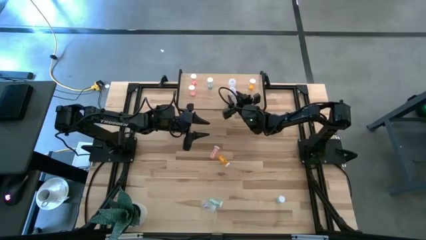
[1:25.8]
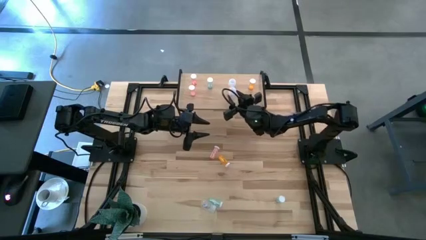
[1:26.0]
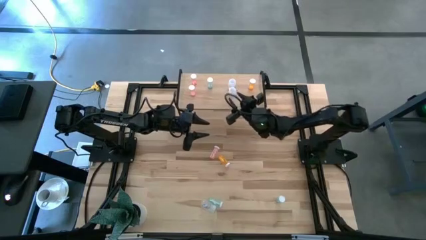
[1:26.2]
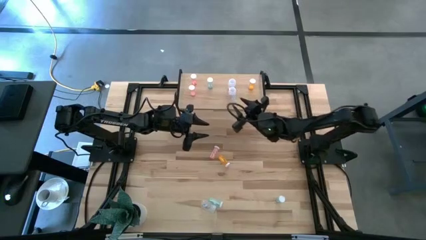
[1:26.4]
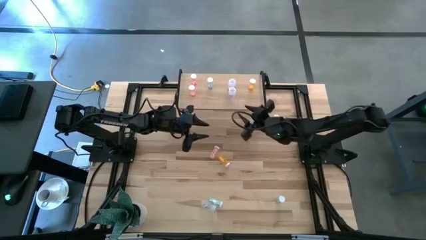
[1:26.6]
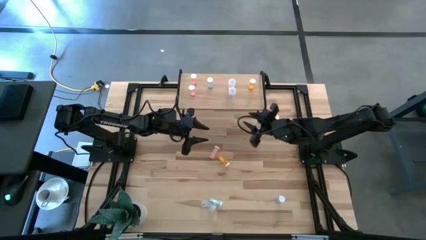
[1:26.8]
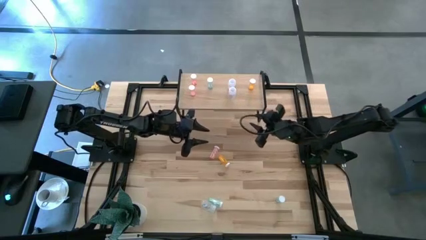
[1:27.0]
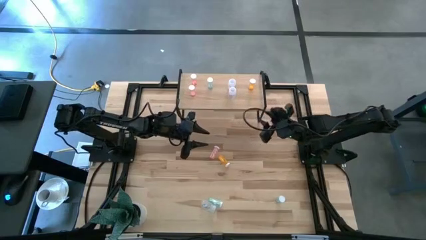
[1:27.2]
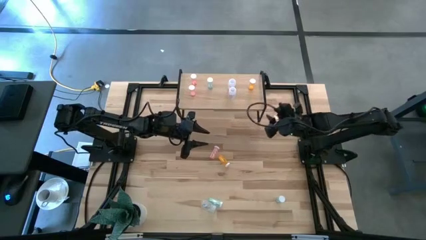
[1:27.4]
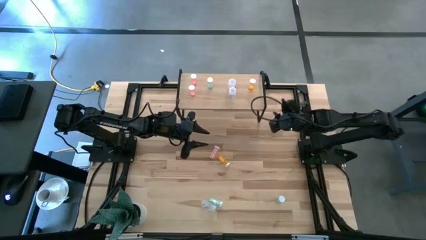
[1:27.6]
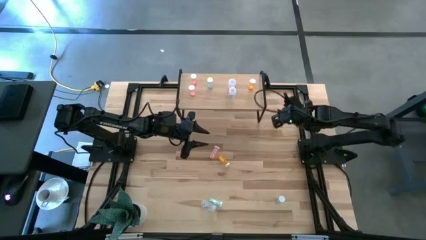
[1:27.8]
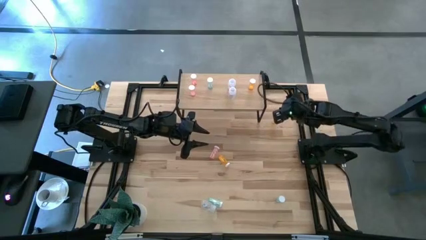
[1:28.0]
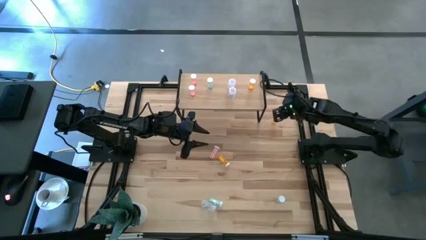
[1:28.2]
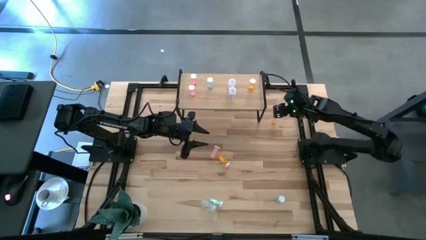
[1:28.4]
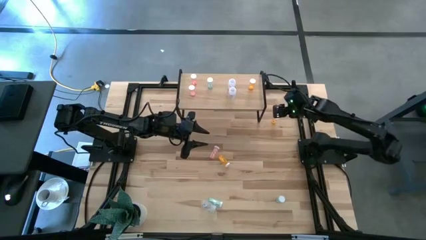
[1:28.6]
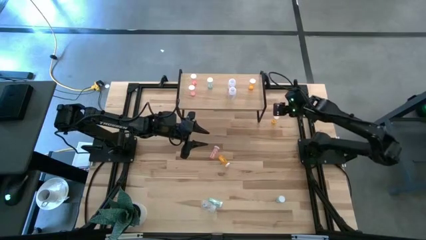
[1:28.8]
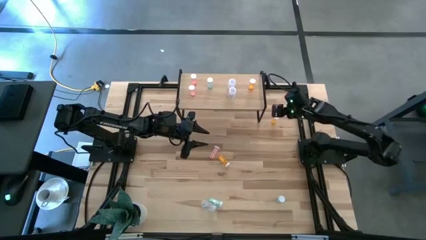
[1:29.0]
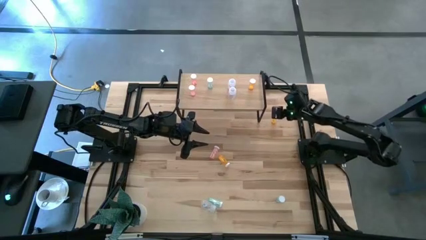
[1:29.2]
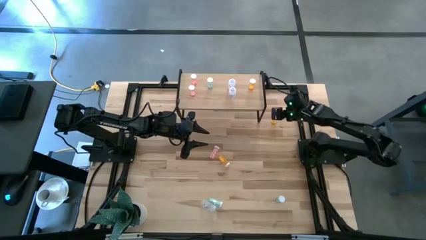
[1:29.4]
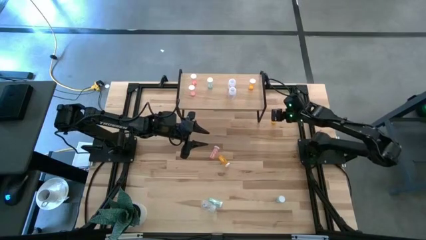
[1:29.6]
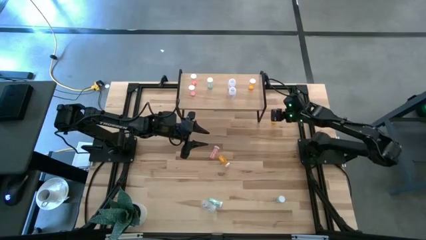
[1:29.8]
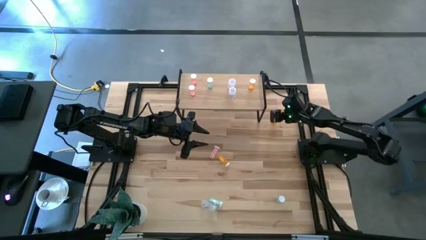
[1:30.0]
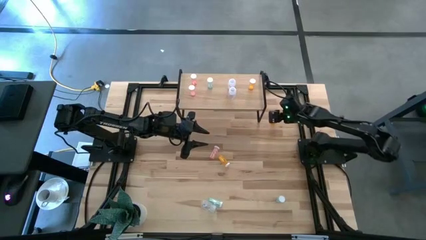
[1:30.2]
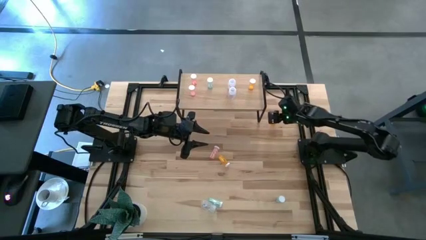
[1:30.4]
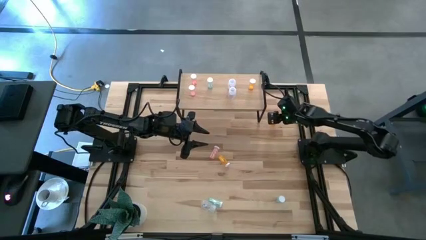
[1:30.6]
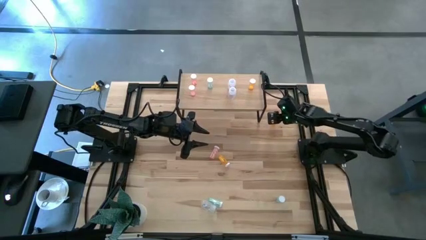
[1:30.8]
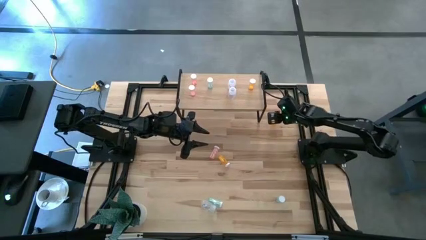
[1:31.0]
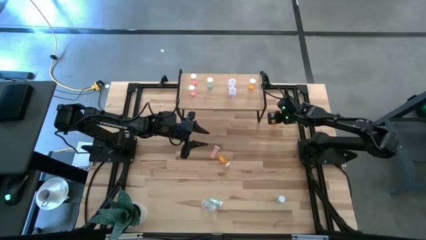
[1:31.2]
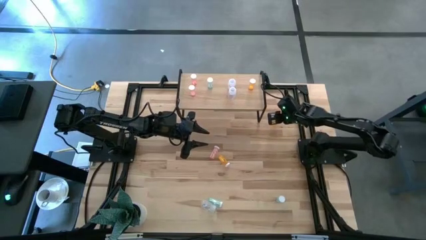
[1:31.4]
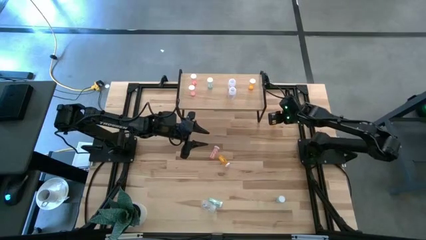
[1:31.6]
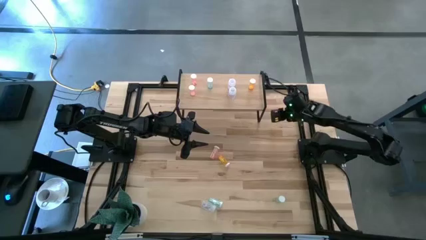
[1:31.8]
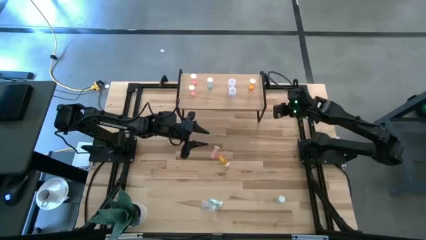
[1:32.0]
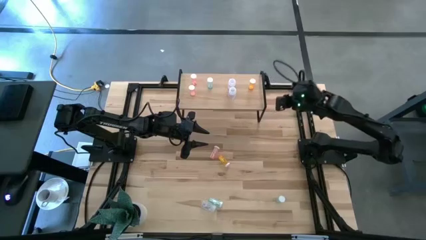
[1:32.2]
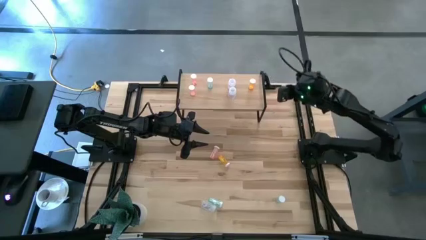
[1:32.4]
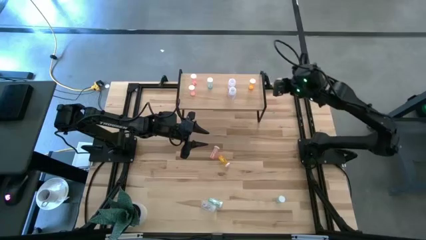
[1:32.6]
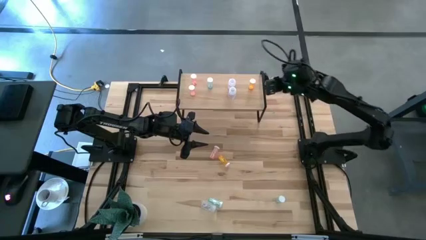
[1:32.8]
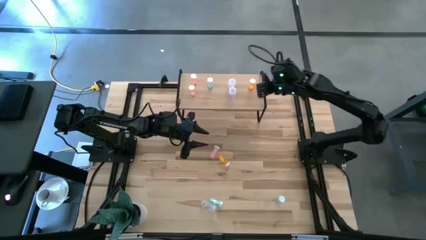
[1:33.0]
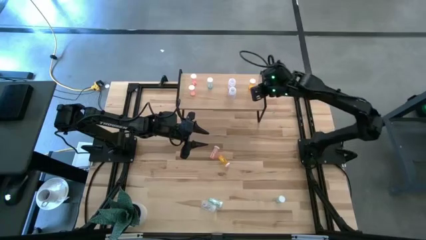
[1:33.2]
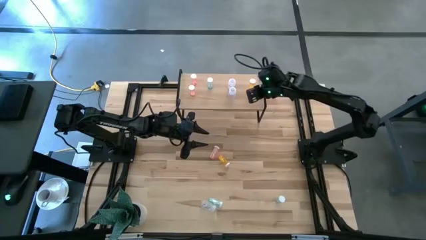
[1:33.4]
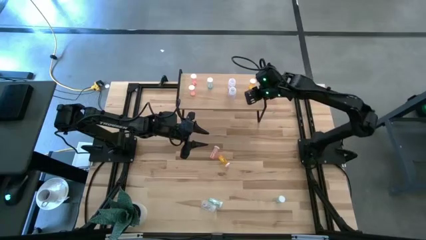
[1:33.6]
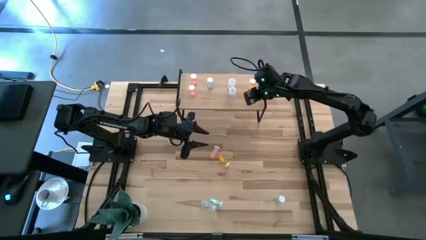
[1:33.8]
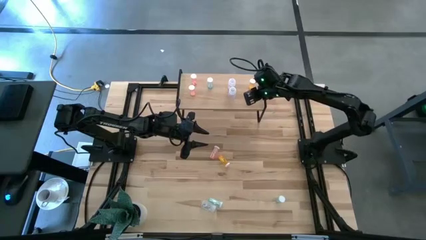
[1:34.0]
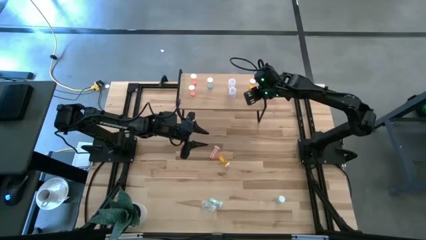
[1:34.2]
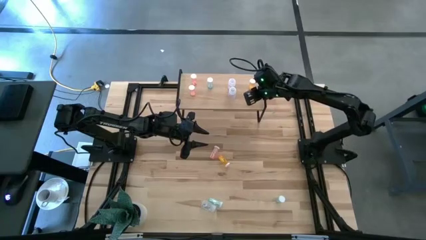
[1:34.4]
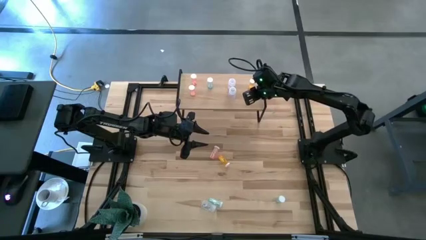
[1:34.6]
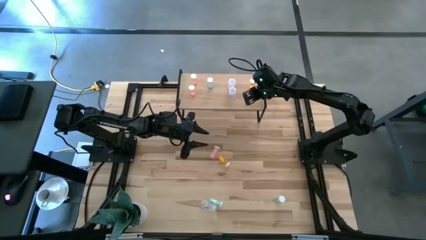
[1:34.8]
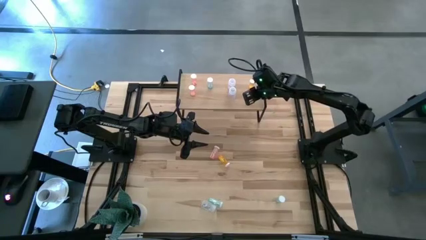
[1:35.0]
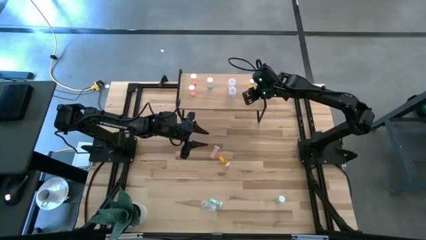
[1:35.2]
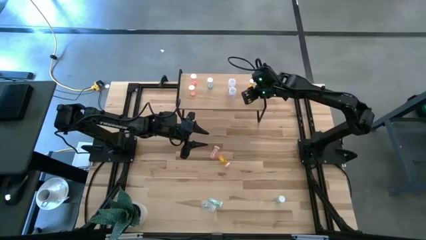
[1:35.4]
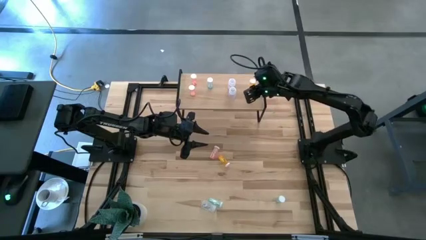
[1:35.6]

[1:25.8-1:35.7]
Task: Pick and place medicine bottles onto shelf by color
Put the top orange pill bottle on the shelf aligned with the other orange pill bottle
